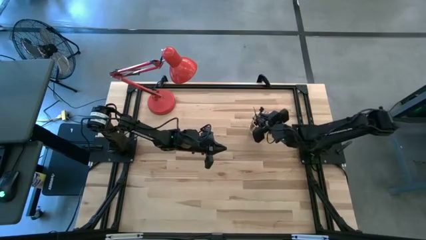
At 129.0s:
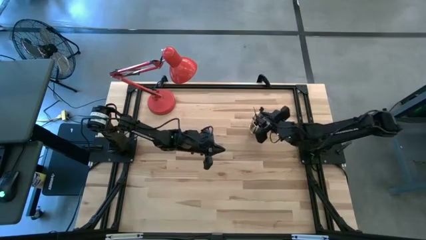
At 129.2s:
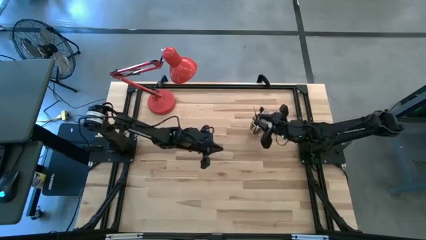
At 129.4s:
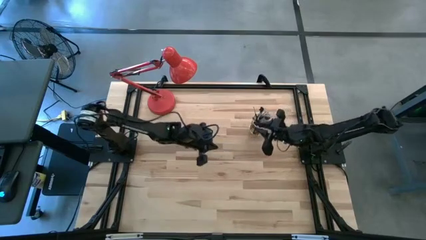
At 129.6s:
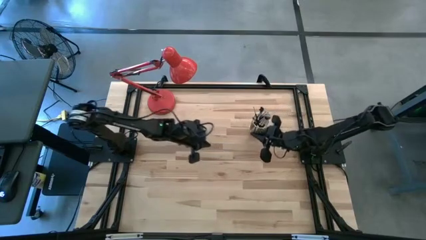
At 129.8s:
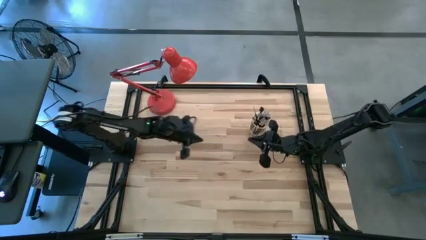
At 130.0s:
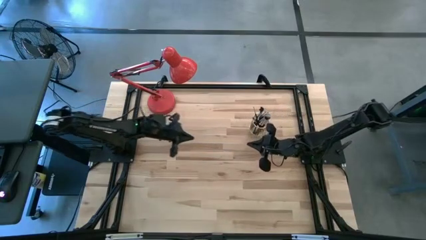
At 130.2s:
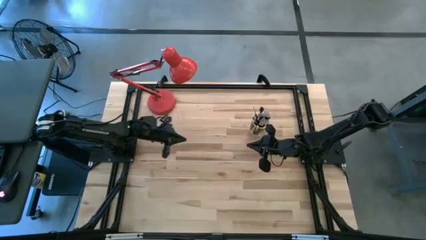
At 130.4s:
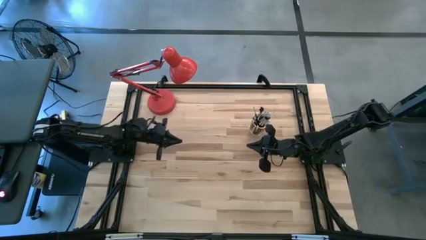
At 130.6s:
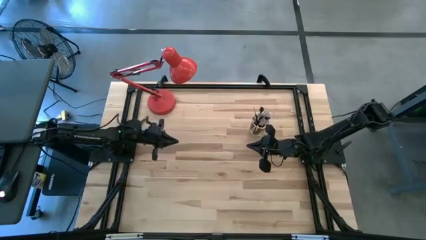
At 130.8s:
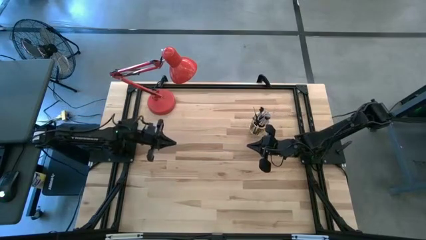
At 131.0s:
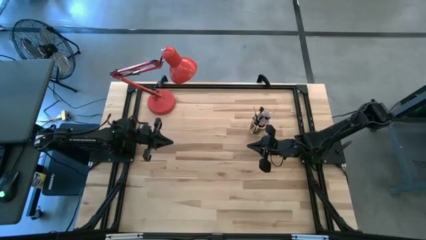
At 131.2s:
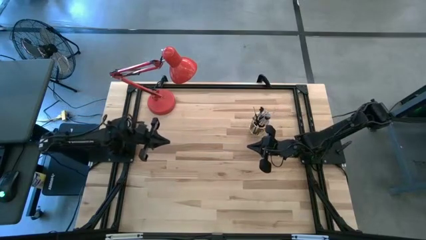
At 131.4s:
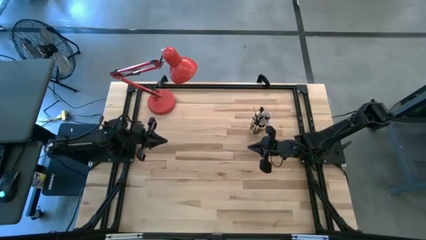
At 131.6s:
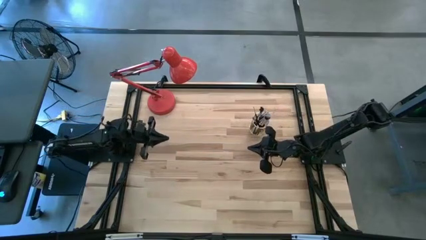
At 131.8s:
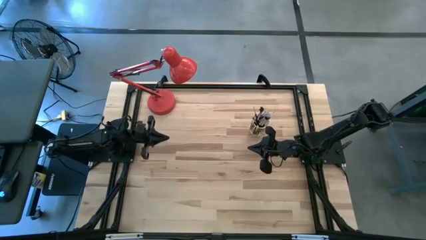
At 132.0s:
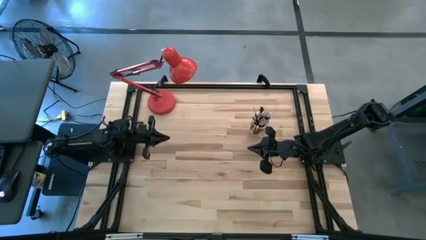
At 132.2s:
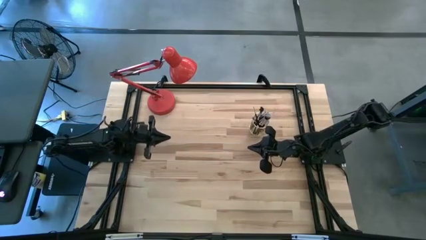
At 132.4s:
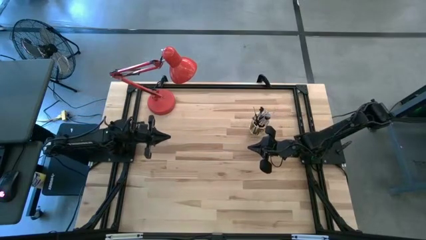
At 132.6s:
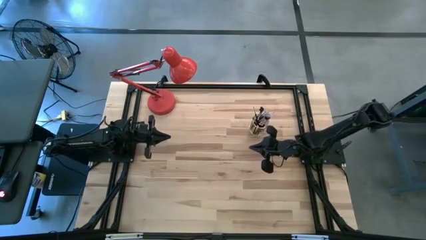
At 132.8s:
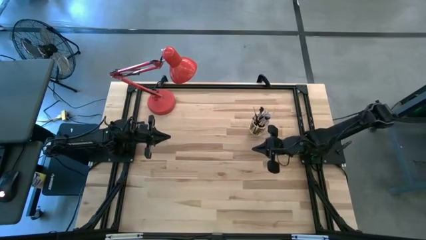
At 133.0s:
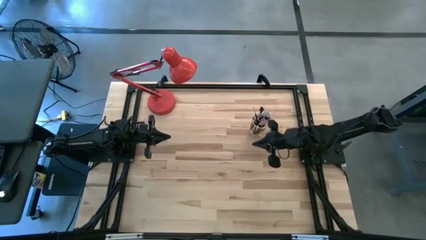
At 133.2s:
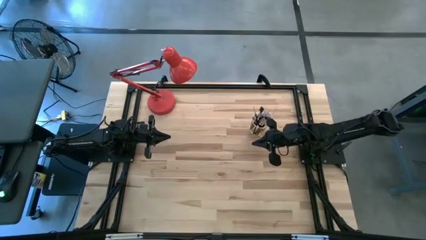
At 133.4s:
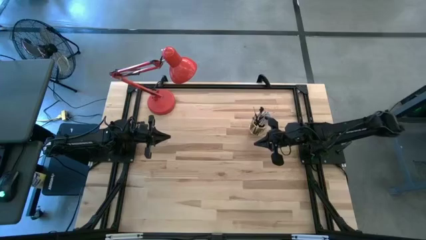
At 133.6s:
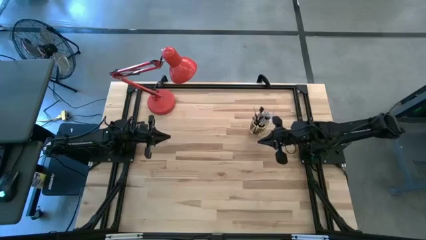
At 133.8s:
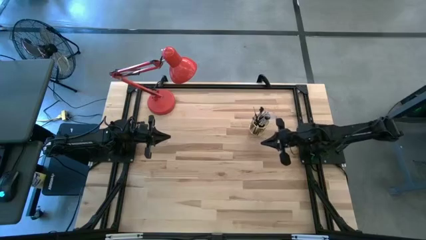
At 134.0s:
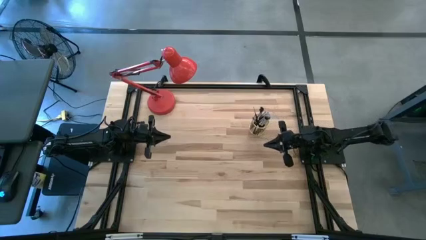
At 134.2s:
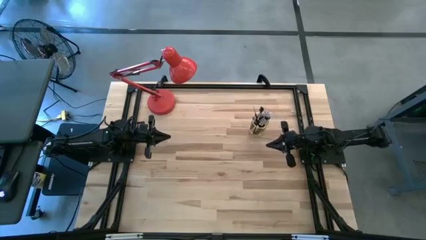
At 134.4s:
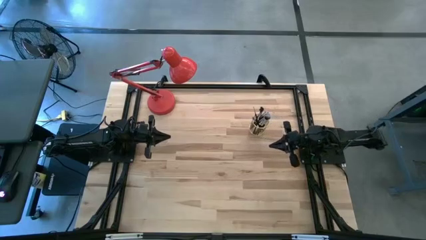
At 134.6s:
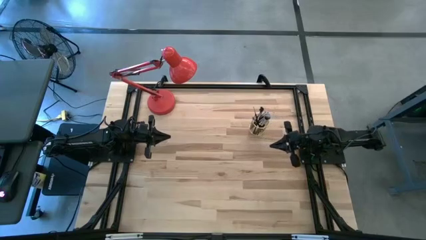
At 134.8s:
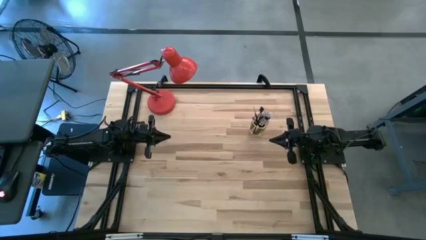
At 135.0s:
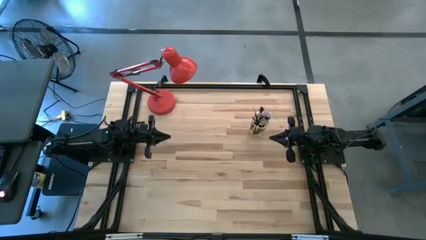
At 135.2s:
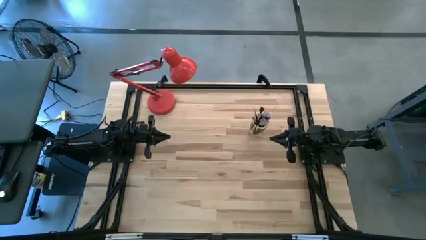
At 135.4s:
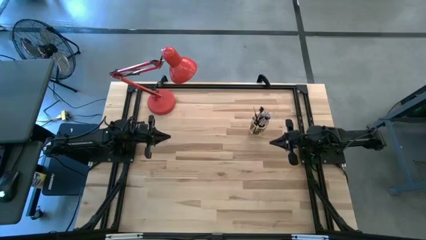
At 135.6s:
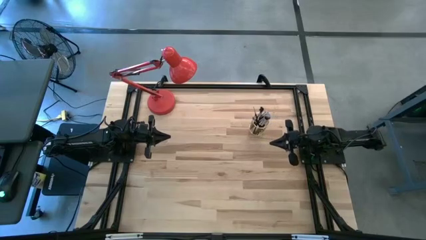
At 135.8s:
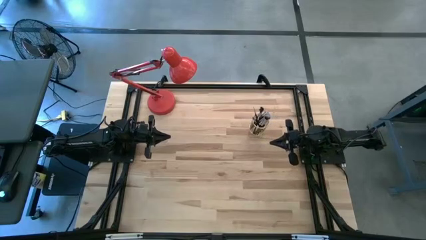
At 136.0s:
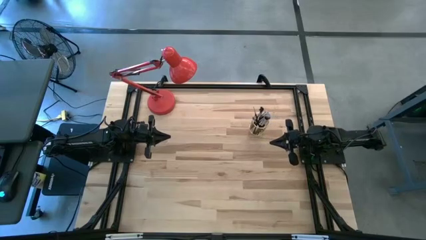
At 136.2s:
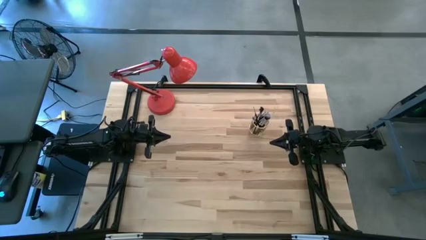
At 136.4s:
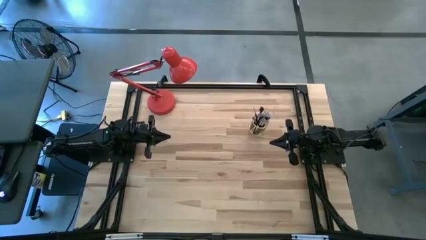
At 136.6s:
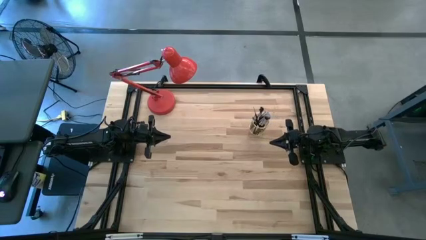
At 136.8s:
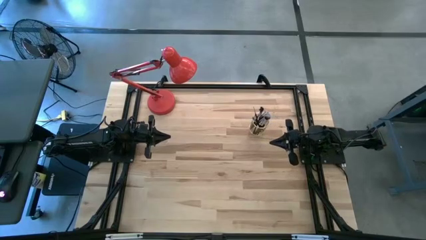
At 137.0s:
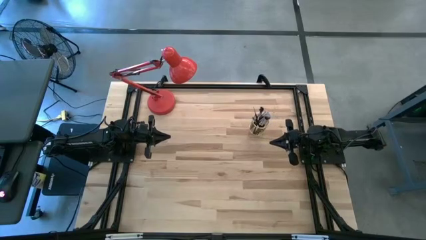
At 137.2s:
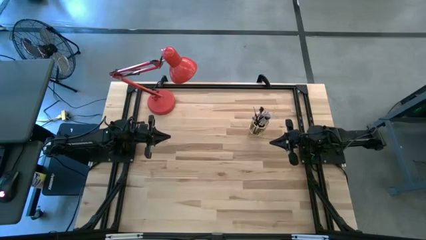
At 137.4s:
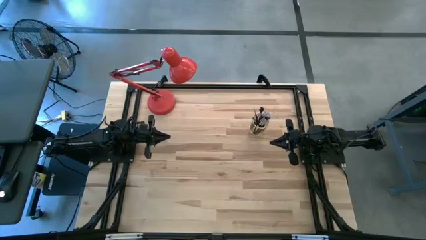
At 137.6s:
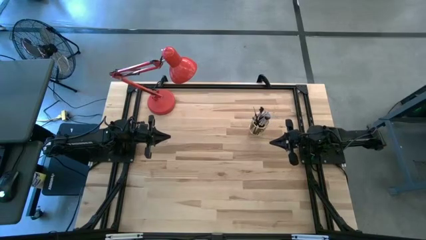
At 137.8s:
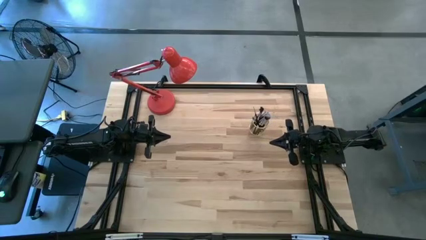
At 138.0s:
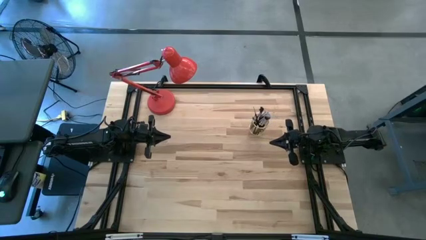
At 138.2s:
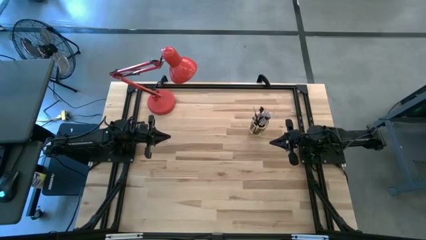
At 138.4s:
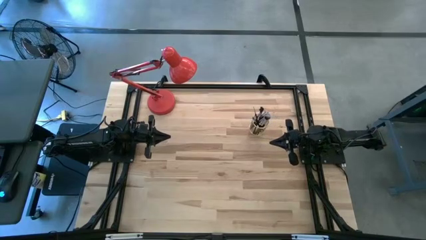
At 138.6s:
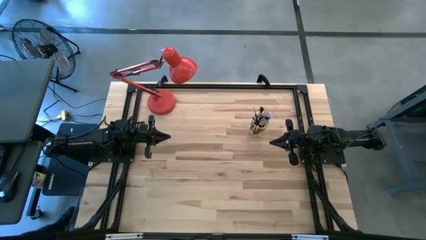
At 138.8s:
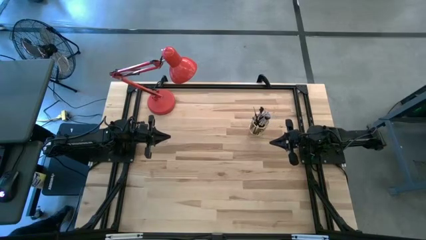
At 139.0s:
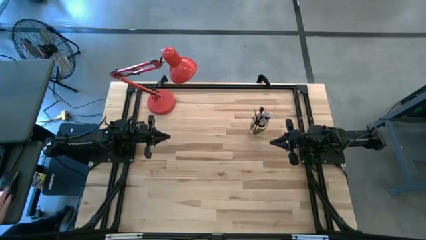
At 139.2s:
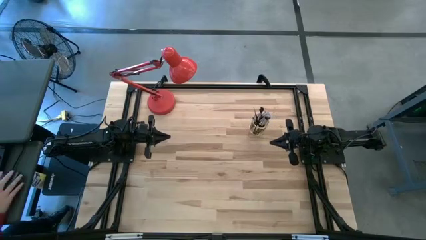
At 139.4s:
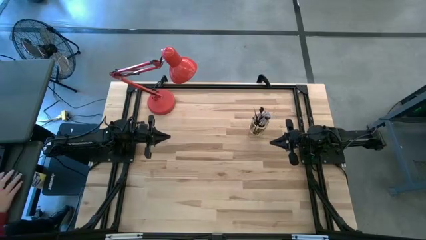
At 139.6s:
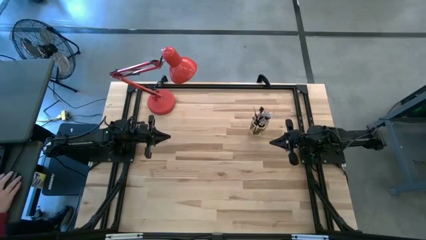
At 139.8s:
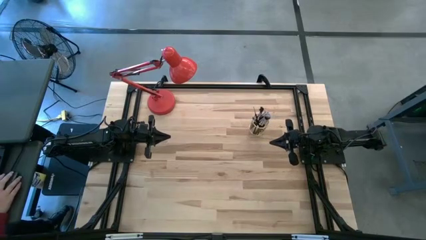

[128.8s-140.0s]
Task: Put items in baskets/containers
Return to Home Position

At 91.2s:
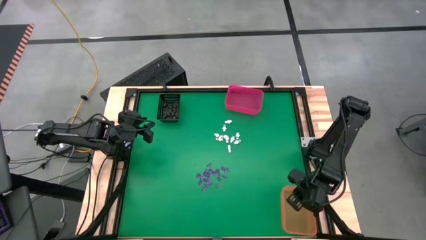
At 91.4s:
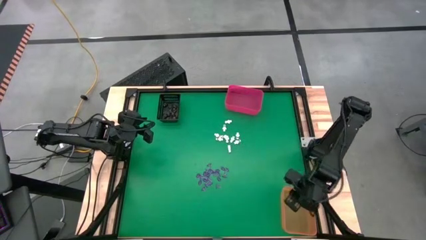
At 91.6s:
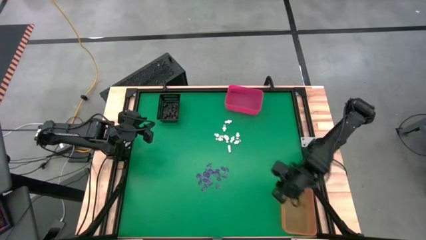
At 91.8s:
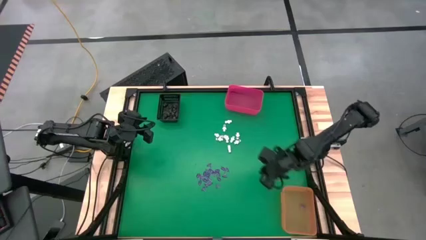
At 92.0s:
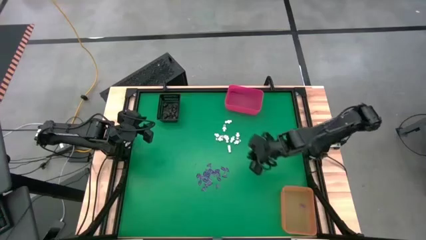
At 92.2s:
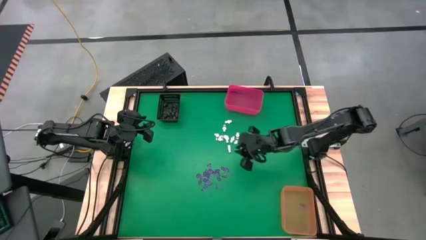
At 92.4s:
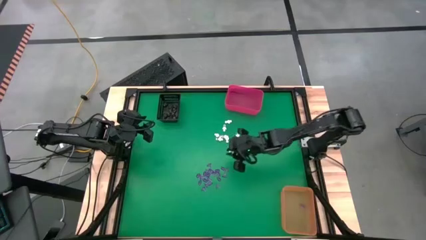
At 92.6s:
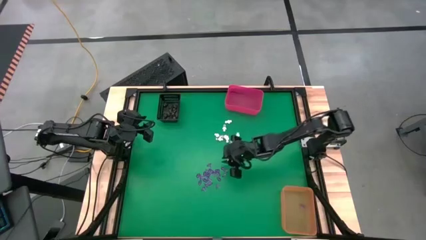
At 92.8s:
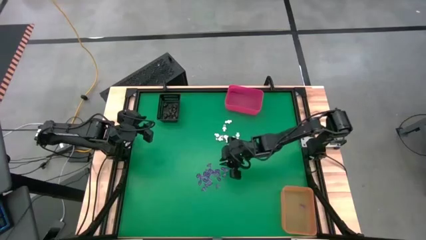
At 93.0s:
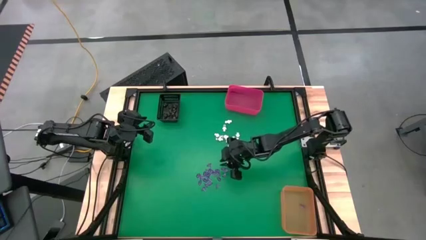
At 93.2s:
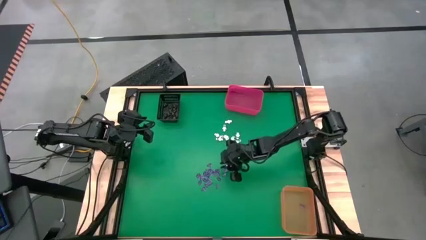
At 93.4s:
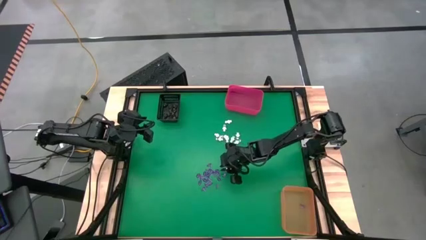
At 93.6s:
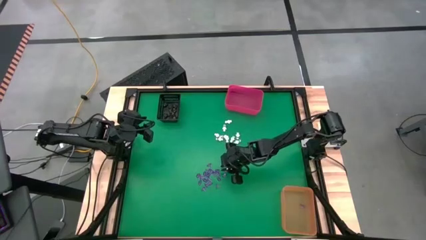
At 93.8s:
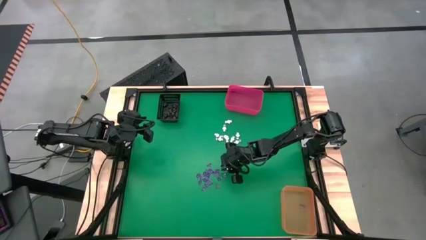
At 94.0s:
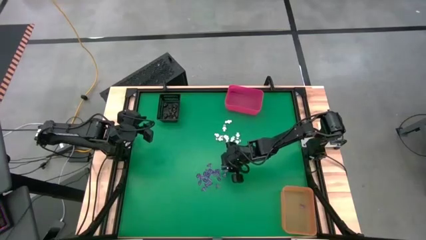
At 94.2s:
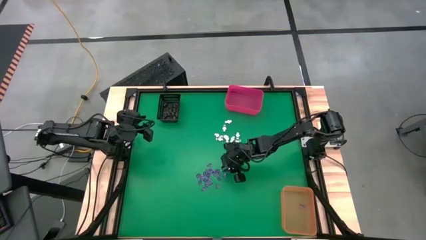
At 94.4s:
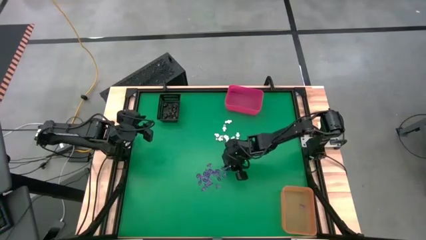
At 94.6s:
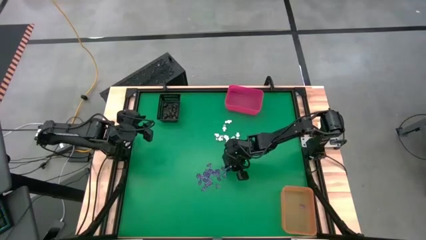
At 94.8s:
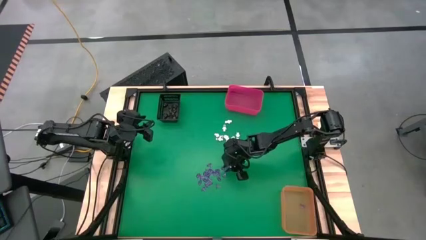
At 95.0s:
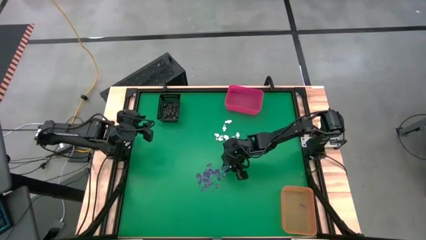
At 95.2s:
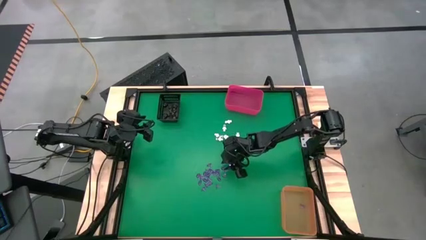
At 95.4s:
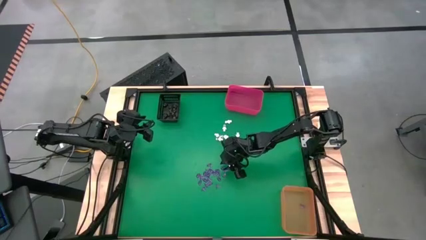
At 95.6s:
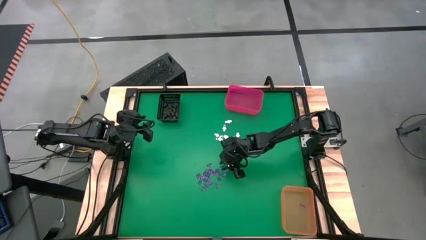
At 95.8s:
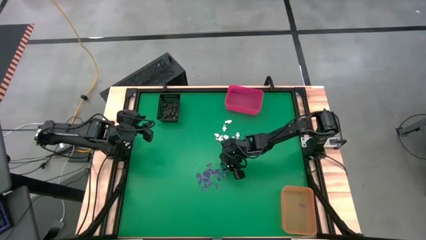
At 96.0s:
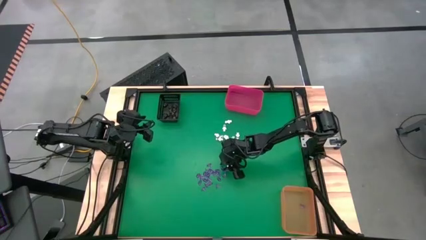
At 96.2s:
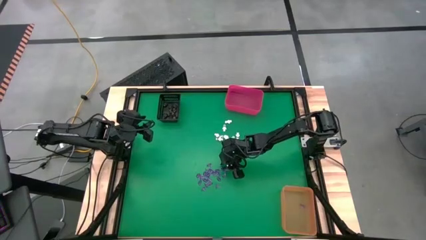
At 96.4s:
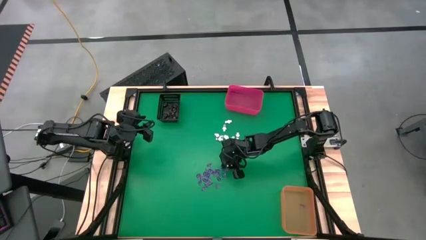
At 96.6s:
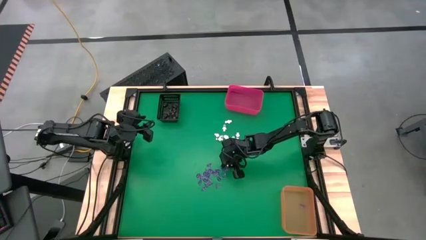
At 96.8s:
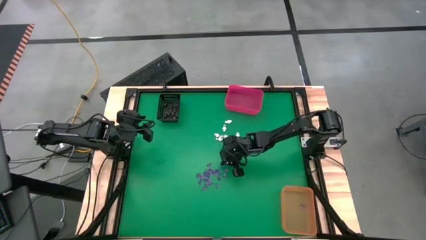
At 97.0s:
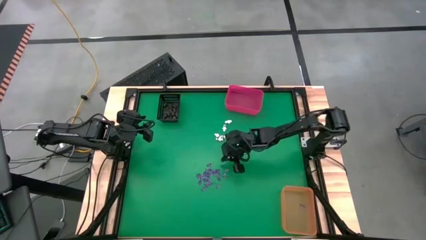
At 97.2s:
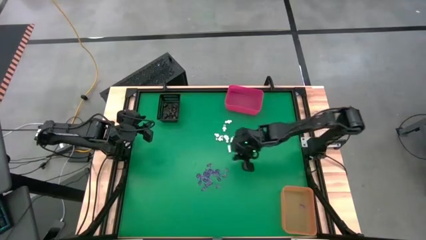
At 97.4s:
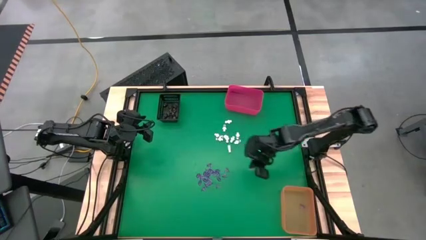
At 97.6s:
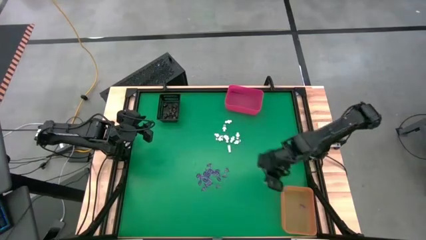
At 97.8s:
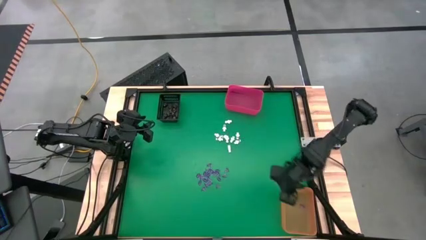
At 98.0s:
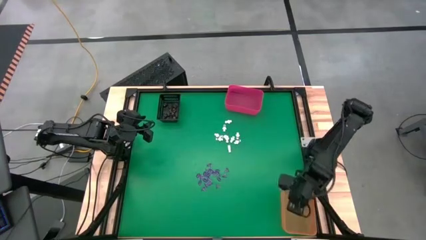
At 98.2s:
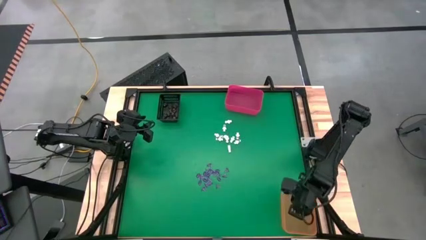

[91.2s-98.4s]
Task: Sort Halloween decoration
Put the pink witch hat toy into the orange bin
